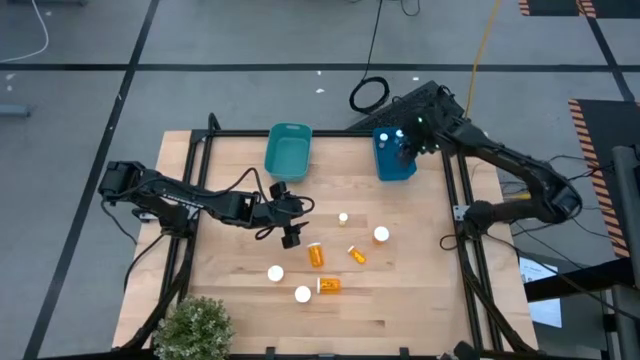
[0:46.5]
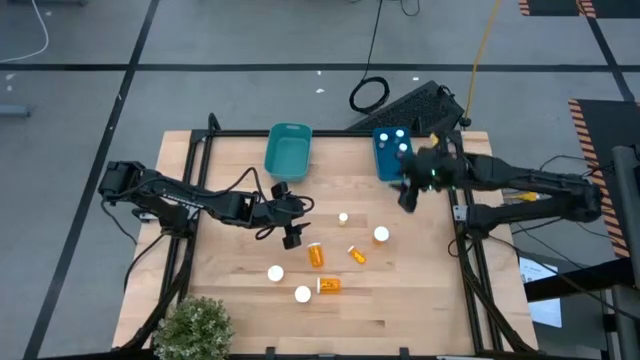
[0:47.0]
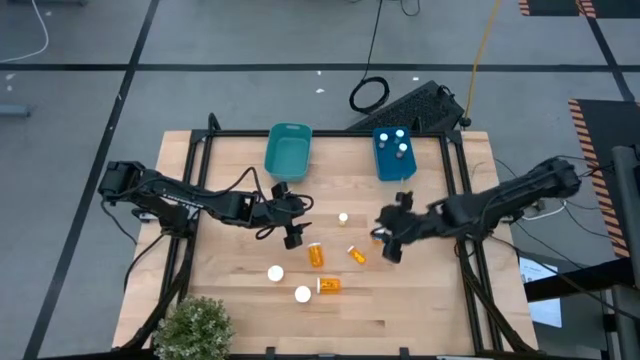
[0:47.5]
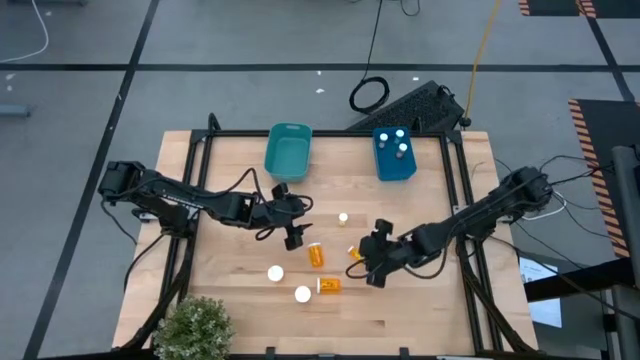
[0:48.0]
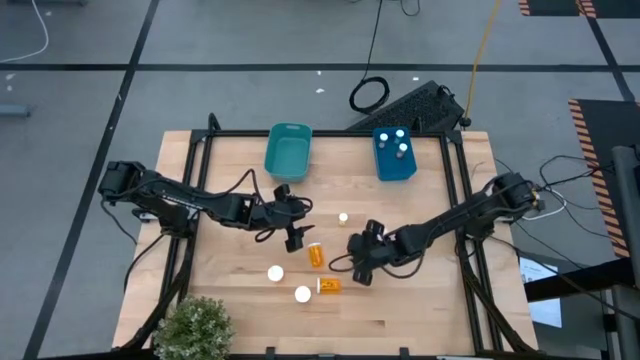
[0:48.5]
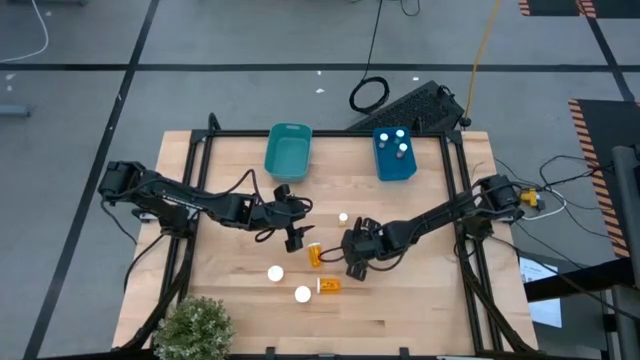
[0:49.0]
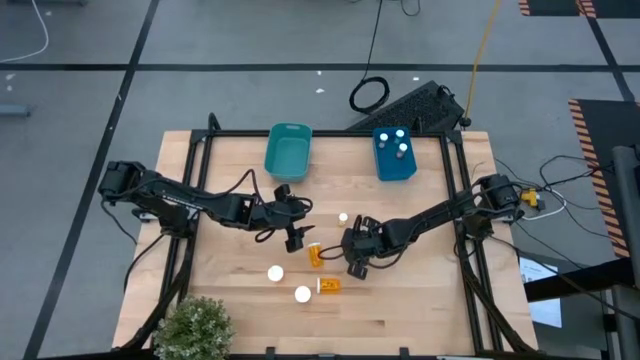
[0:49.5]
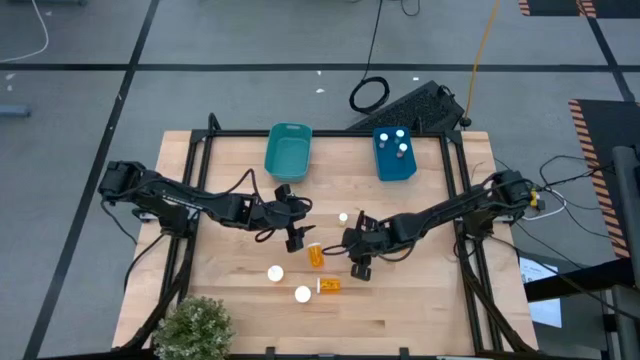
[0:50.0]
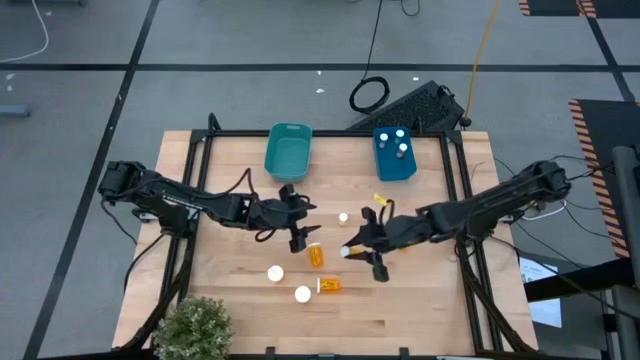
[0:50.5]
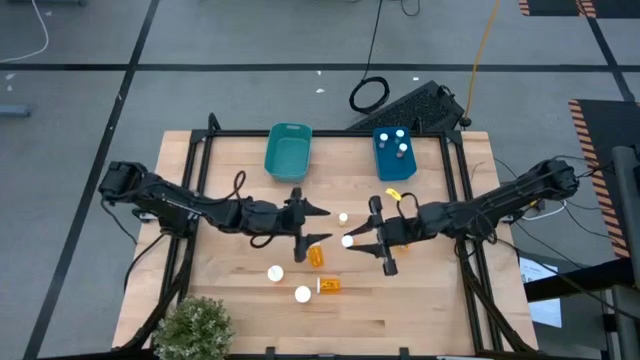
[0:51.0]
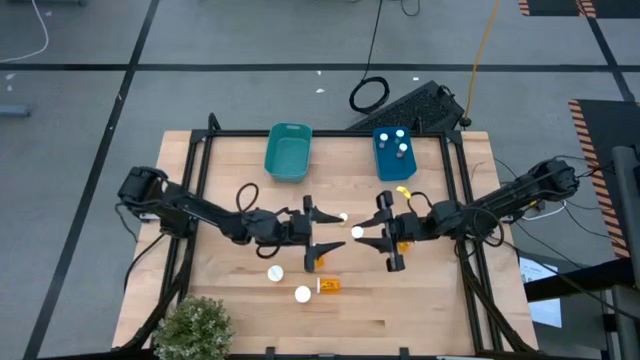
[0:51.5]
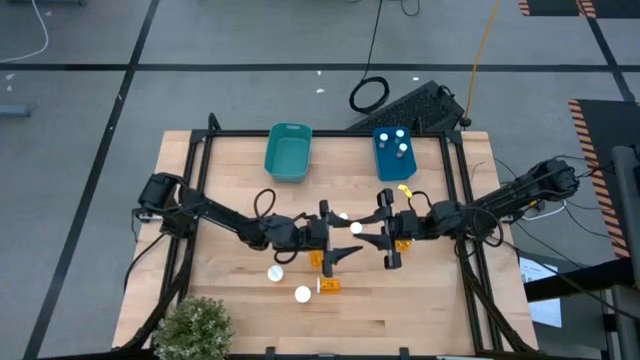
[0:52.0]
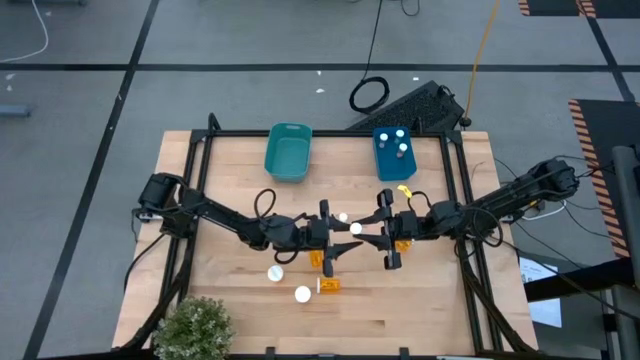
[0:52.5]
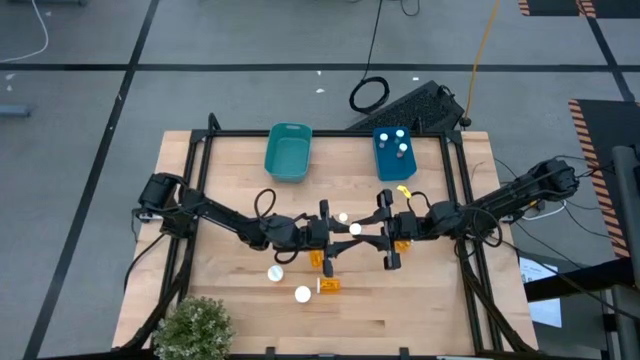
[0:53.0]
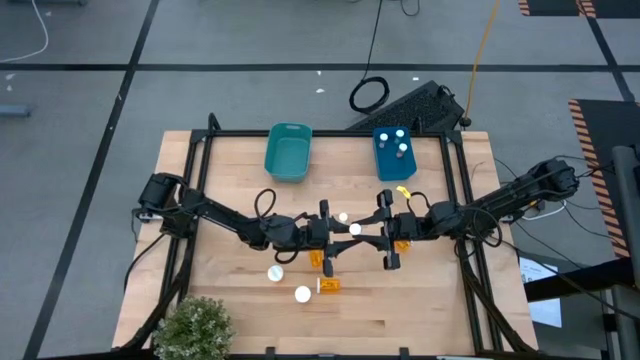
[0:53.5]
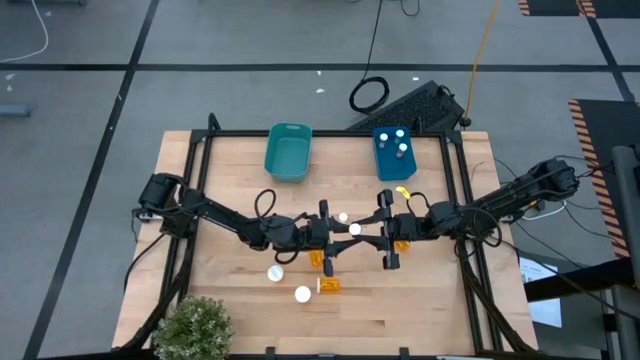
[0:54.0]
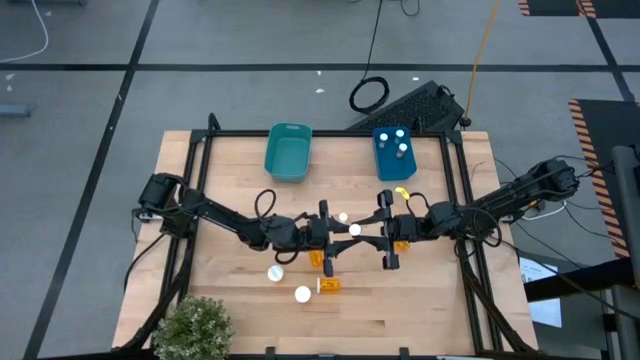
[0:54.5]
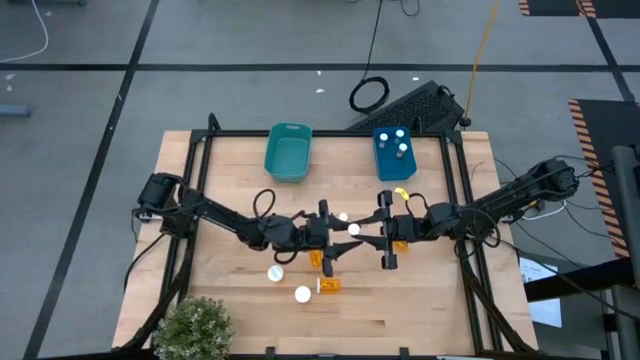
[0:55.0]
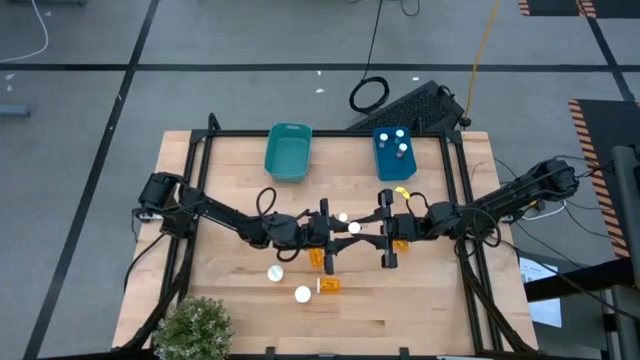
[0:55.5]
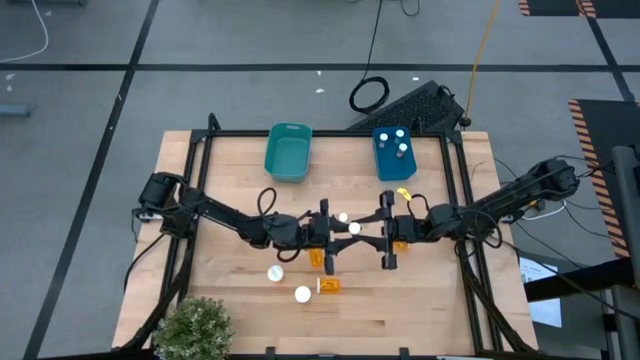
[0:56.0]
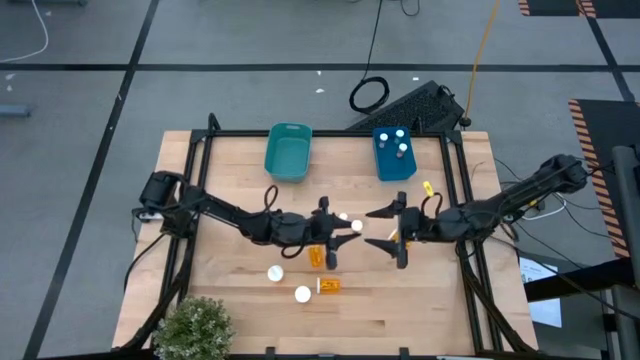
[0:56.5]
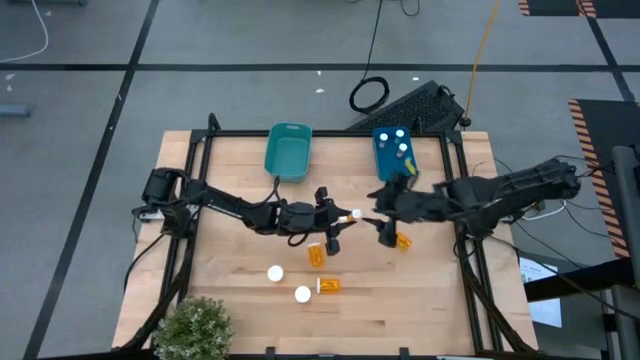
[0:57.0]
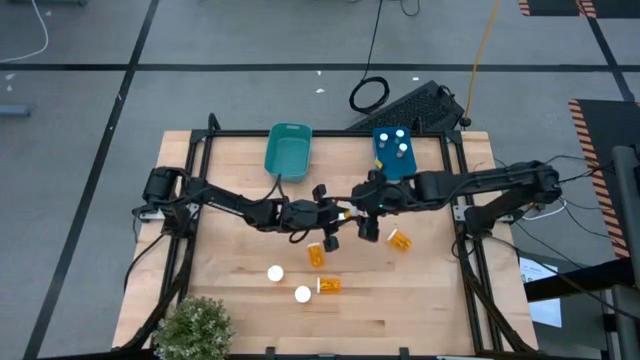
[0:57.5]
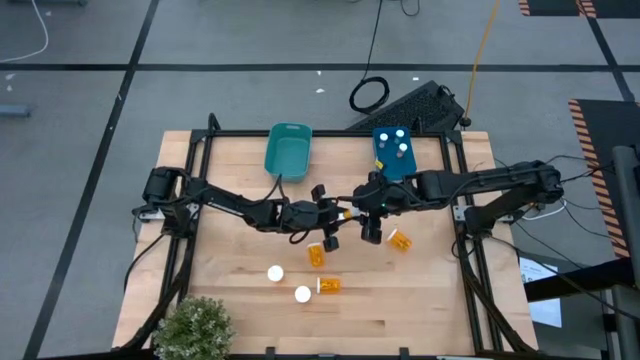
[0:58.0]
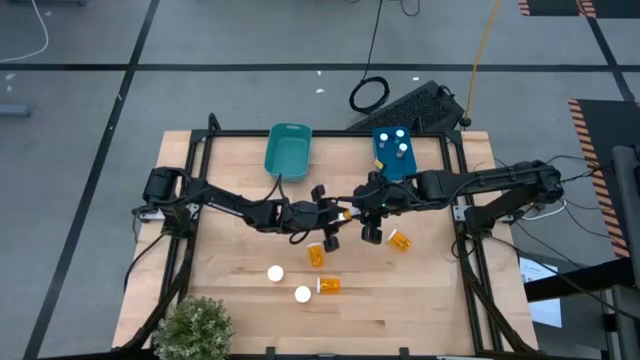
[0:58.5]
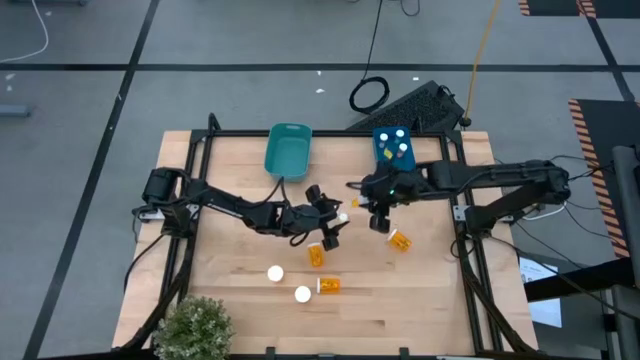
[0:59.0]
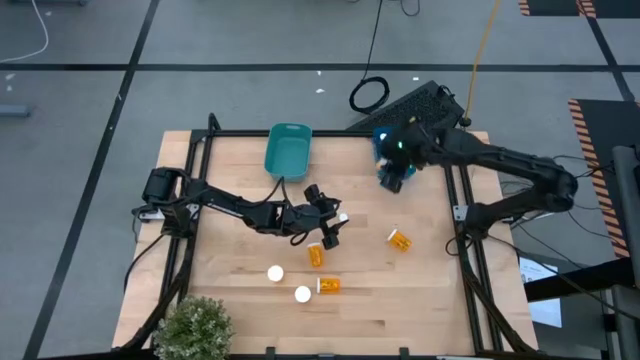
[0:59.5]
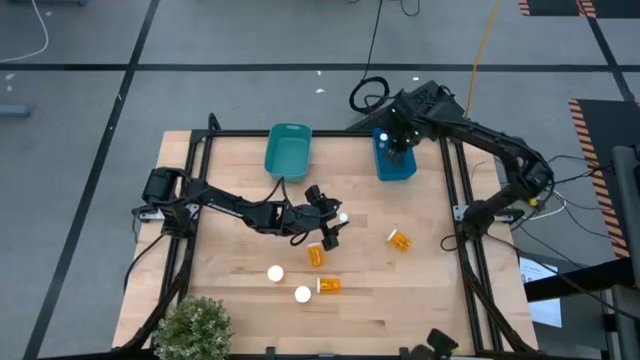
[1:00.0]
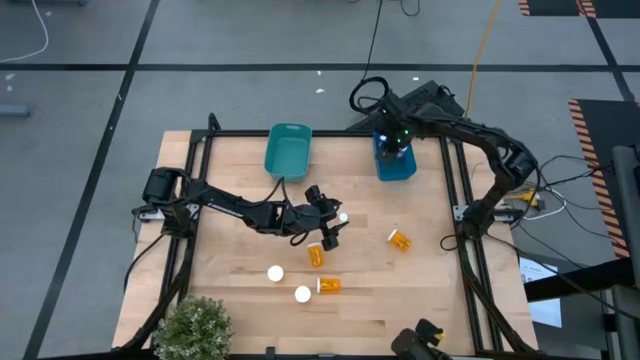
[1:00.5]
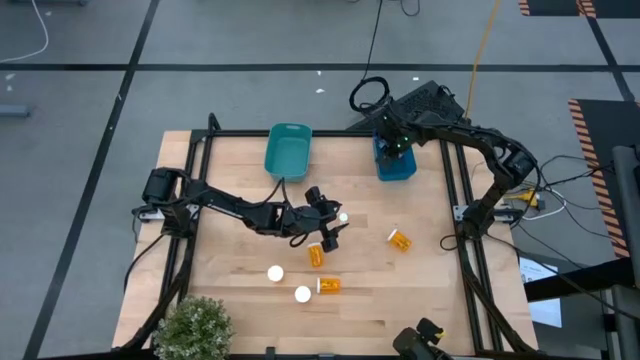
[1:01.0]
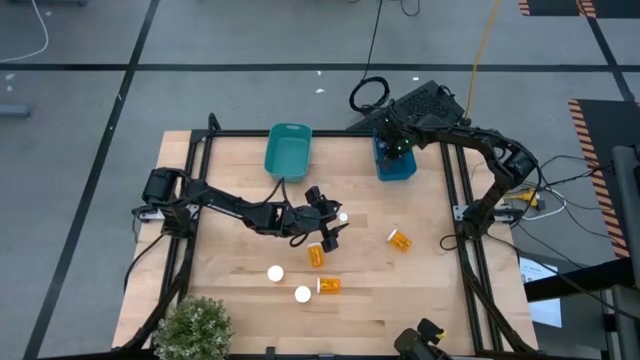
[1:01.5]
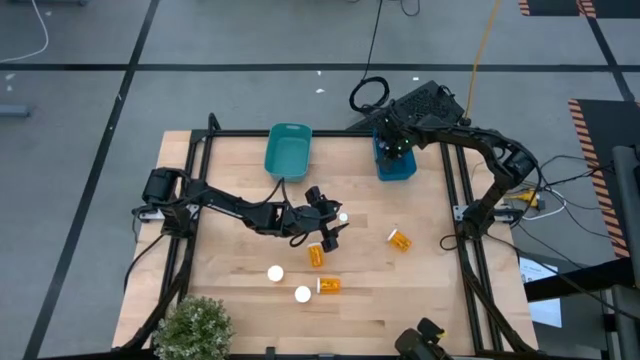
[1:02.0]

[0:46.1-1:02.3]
Task: Pick and place medicine bottles into bin by pill shape (circle, oval)
Put the small orange pill bottle into the blue bin

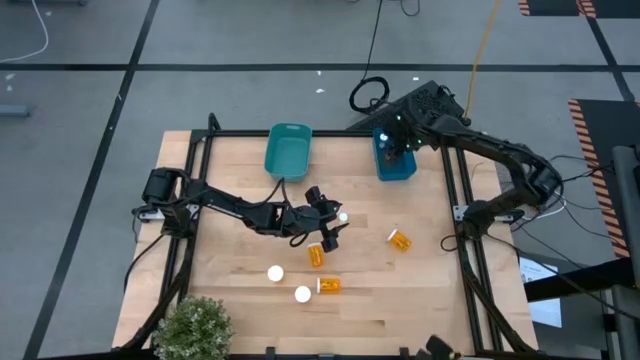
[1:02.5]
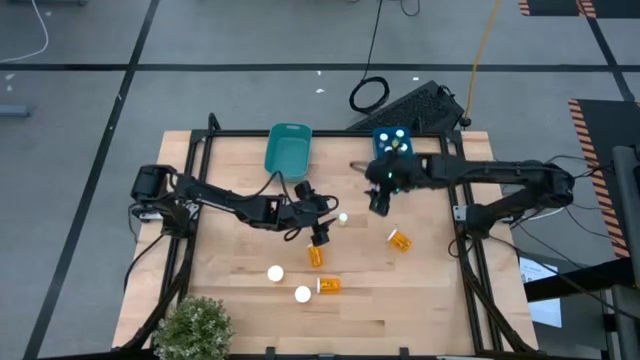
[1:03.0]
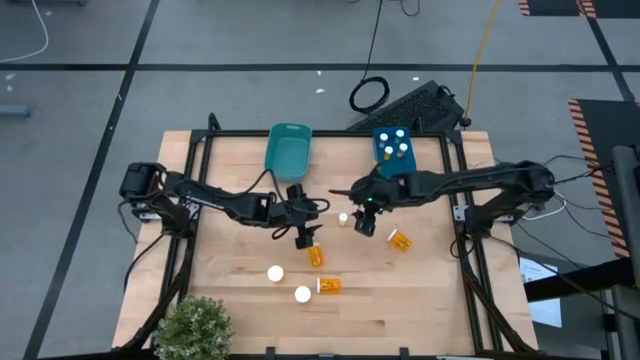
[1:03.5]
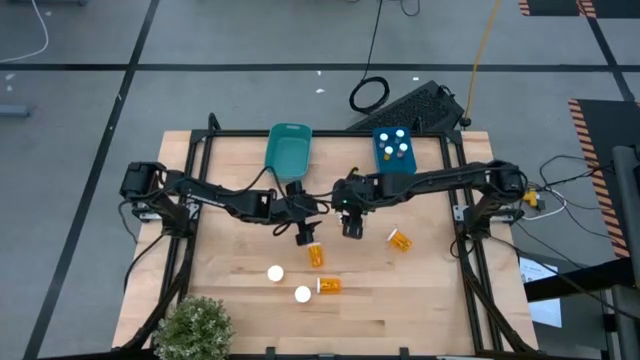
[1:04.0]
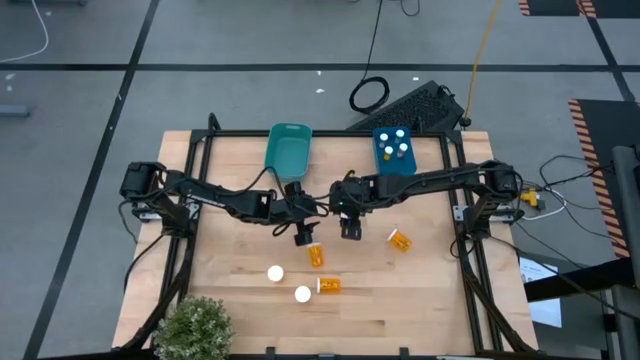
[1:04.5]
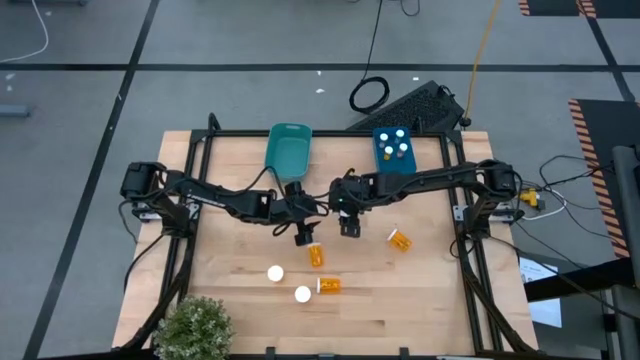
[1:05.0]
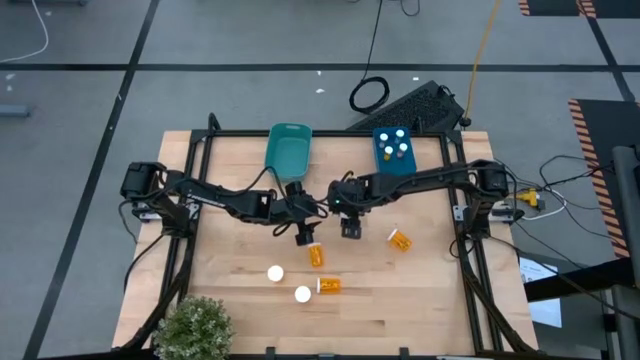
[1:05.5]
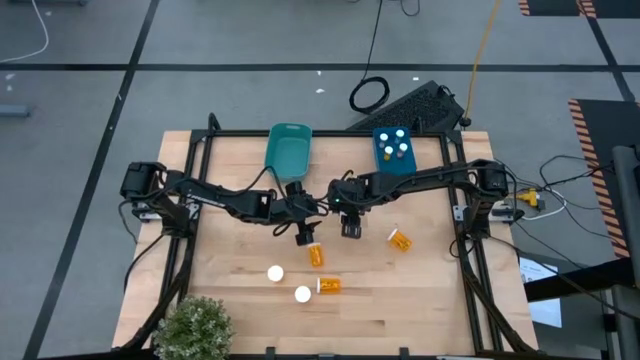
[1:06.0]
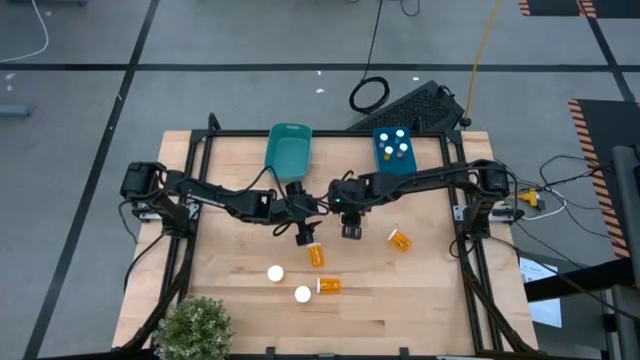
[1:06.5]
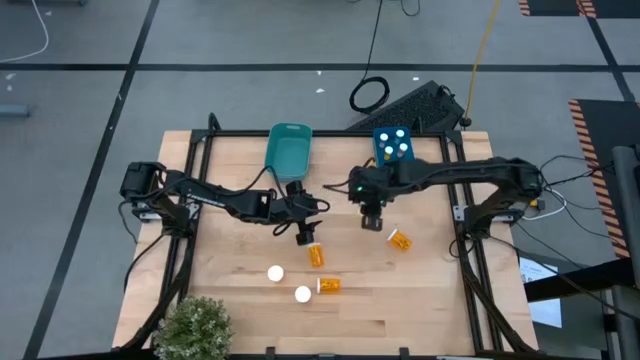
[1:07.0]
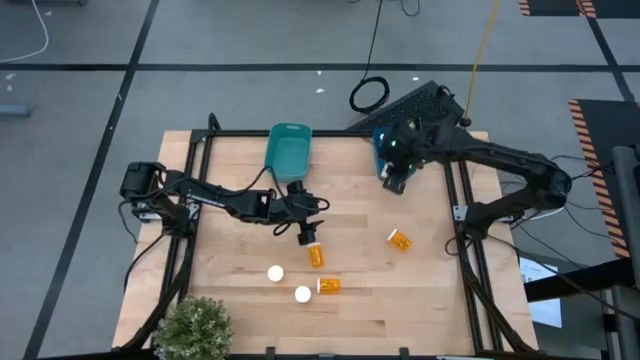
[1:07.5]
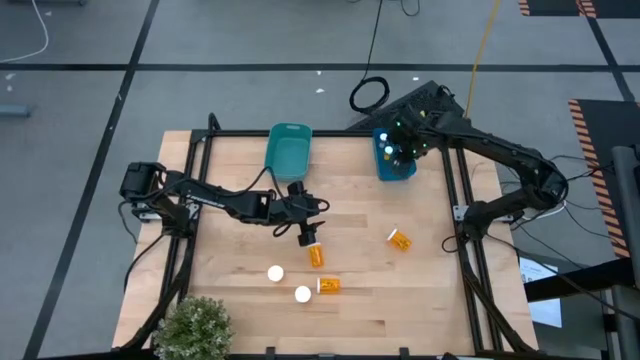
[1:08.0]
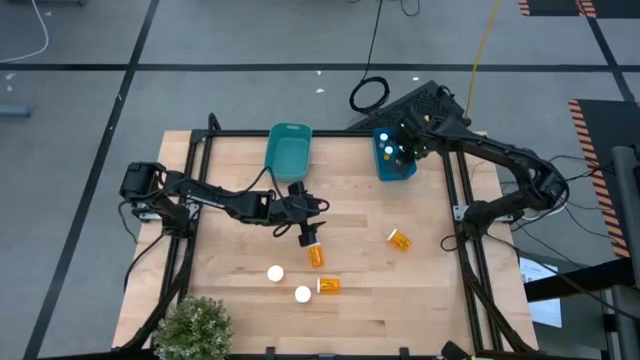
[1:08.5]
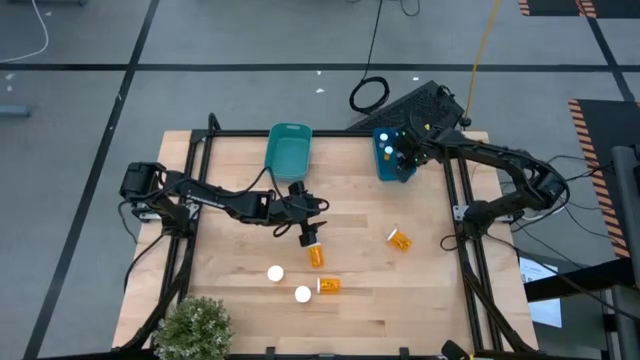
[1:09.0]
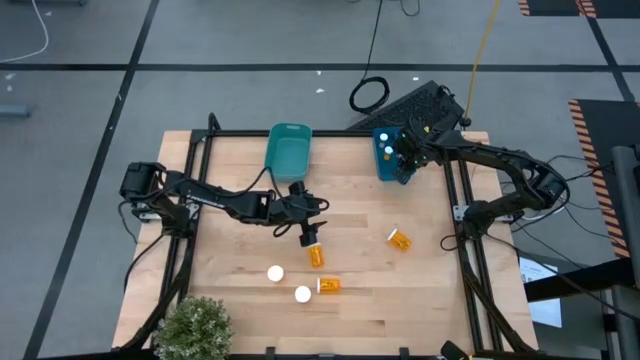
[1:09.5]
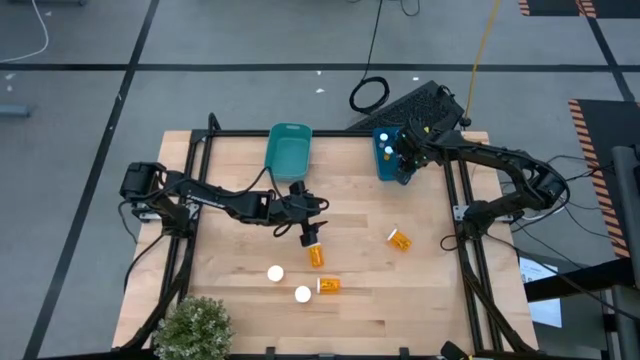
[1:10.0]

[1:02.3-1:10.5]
Put the small yellow pill bottle into the blue bin
